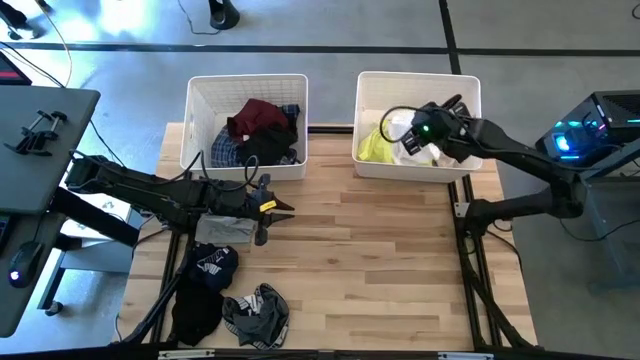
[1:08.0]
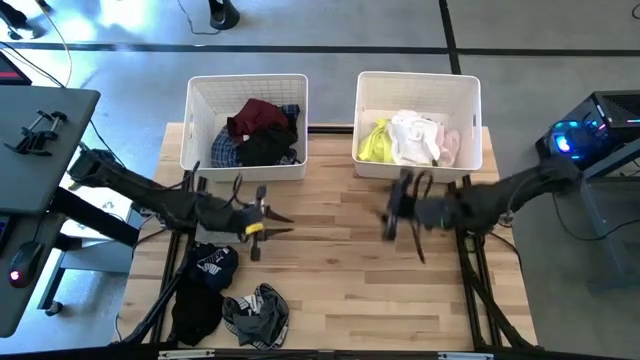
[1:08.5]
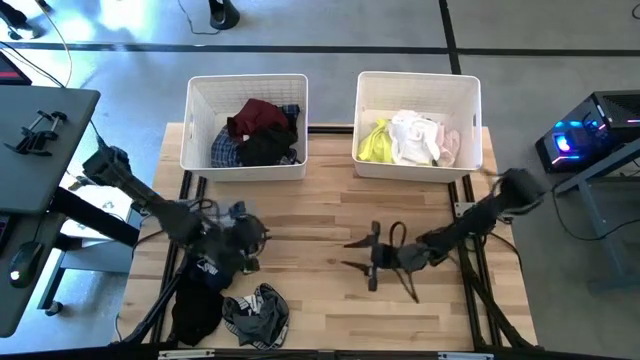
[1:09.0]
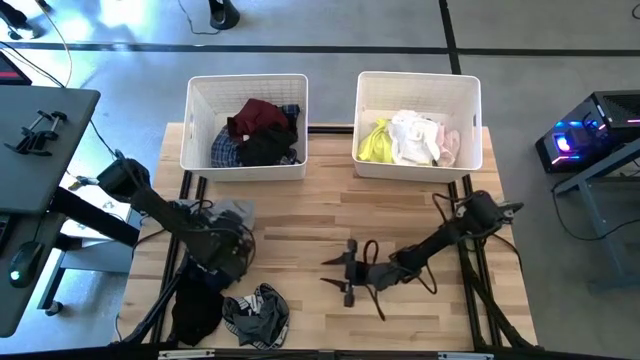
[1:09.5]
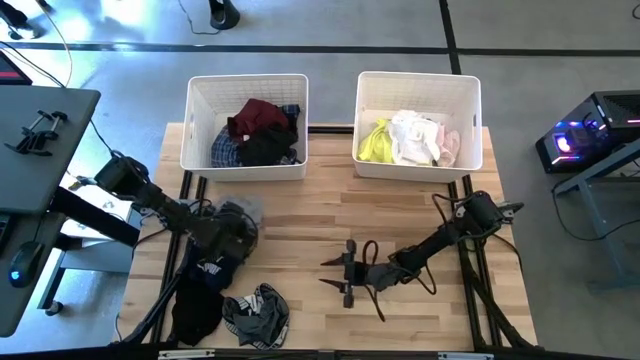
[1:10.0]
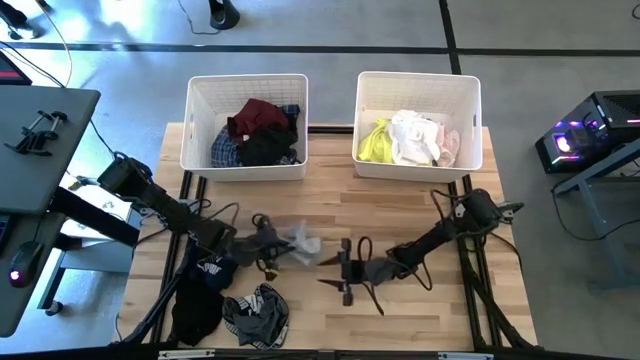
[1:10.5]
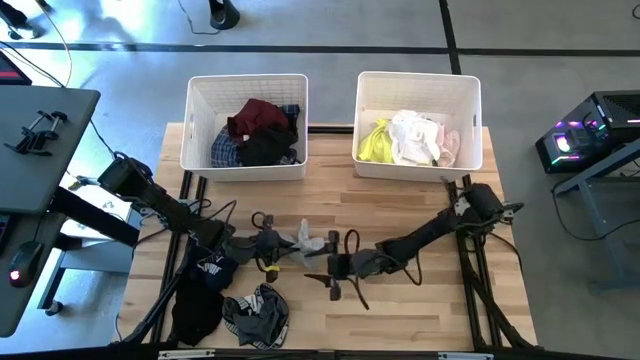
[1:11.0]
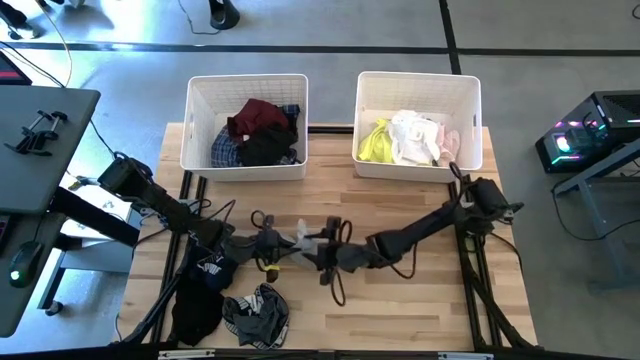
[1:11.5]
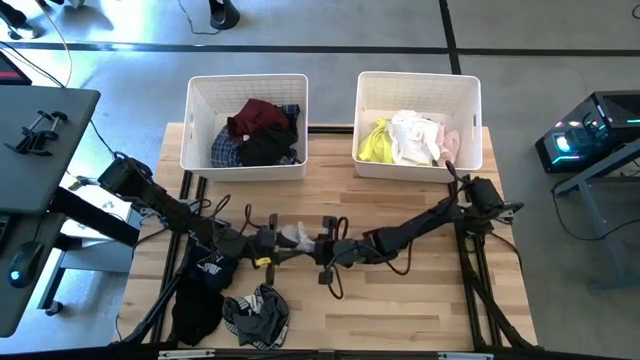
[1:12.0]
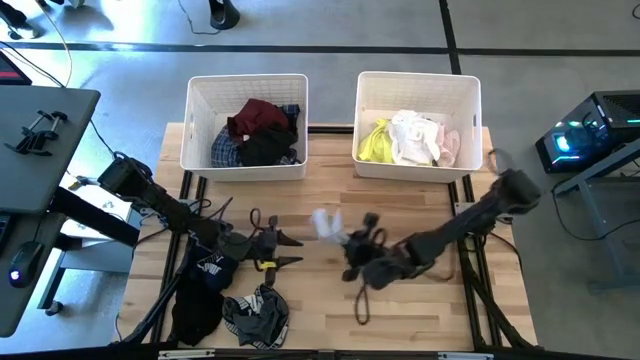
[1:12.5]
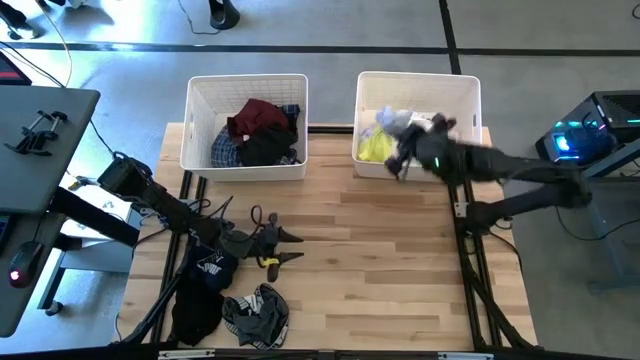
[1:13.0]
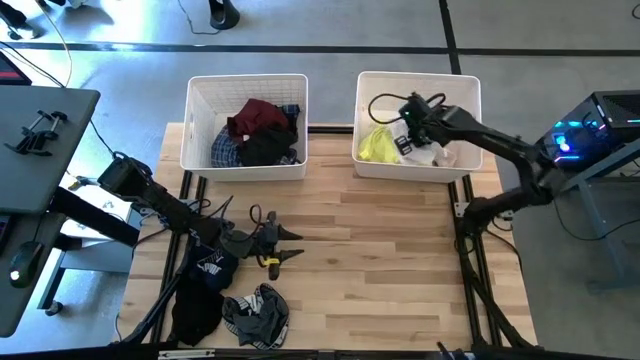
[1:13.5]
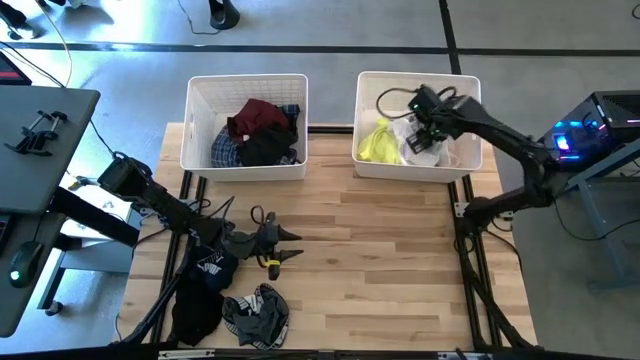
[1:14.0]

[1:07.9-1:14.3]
Task: Sort clothes
Put the gray underwear into the right white bin

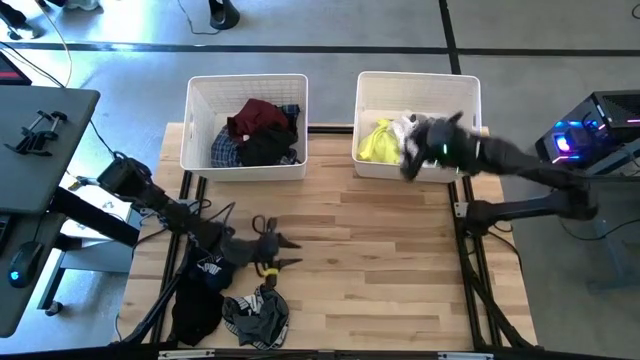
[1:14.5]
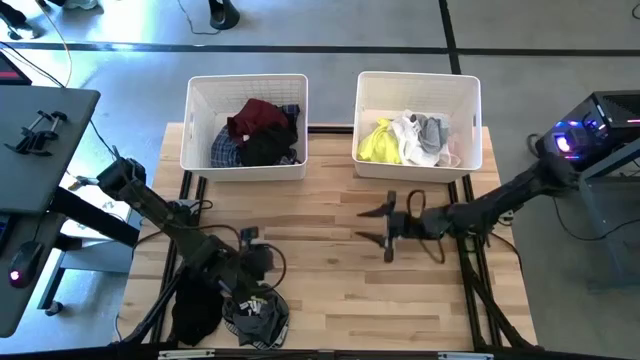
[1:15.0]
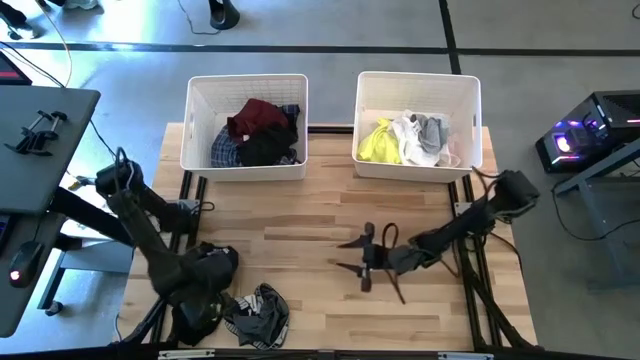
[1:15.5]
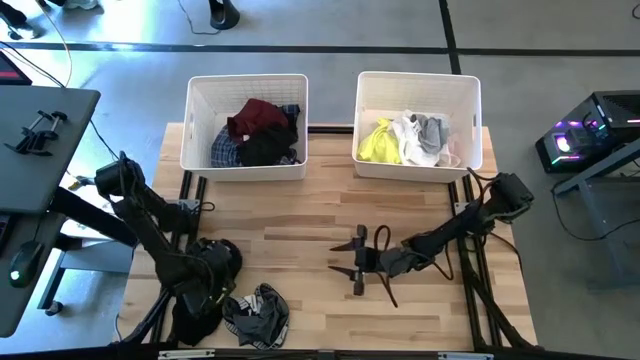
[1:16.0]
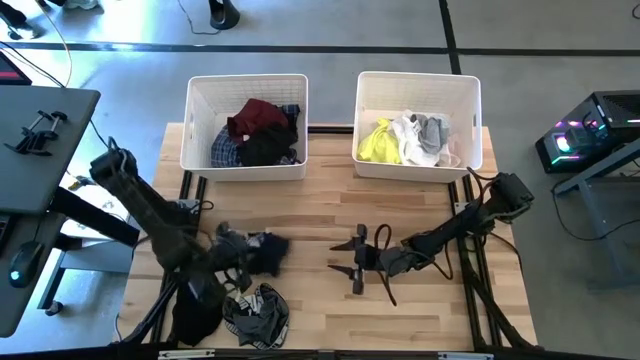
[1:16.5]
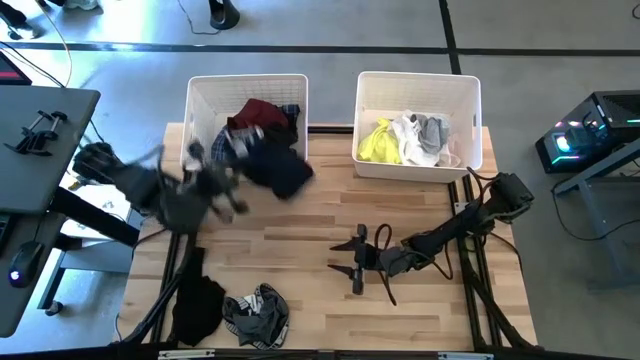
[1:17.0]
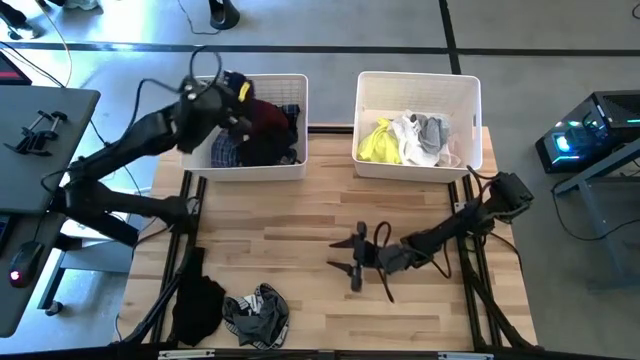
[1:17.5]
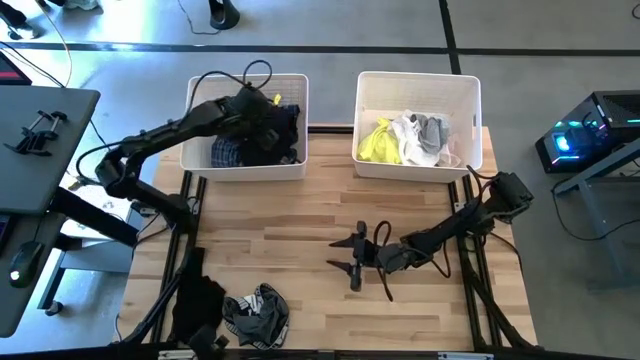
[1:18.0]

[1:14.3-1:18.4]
Put the dark blue boxer shorts into the left white bin

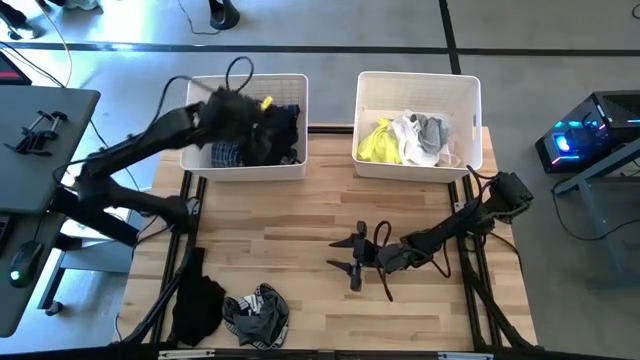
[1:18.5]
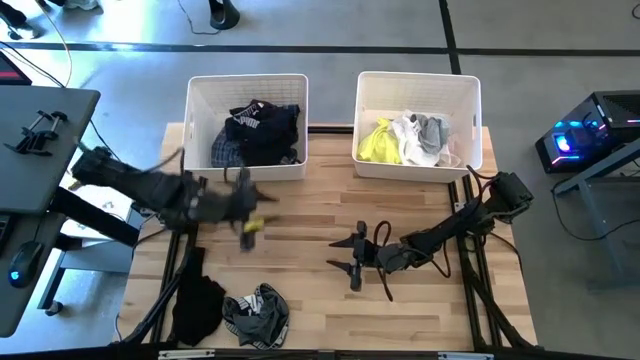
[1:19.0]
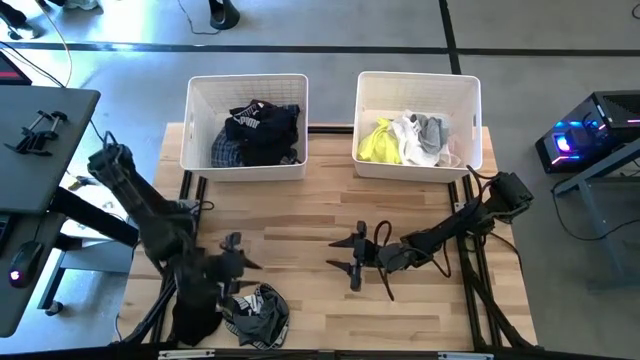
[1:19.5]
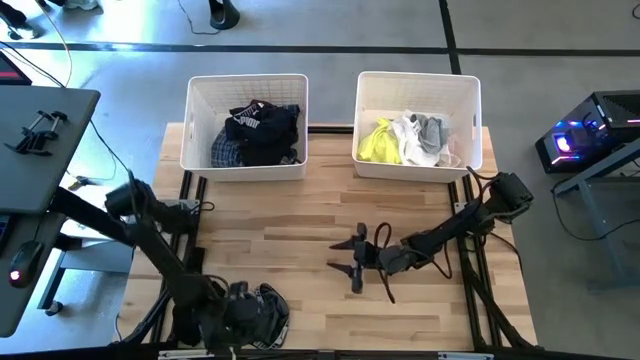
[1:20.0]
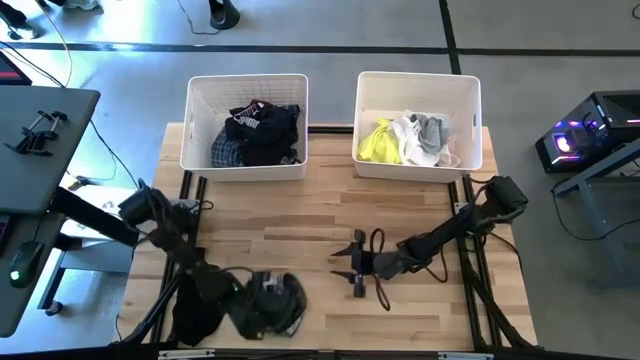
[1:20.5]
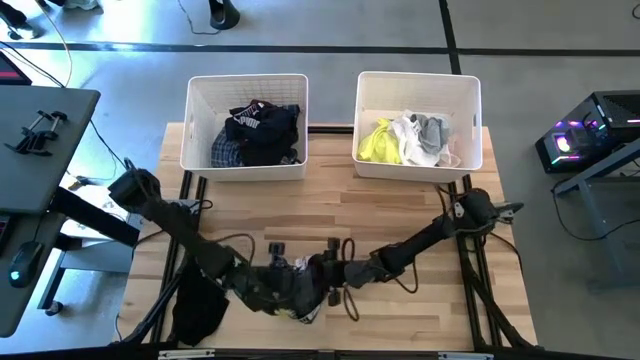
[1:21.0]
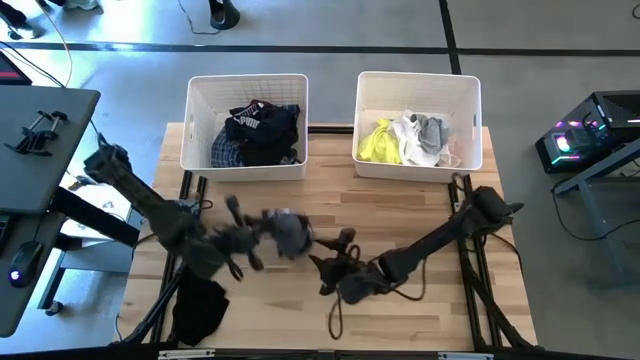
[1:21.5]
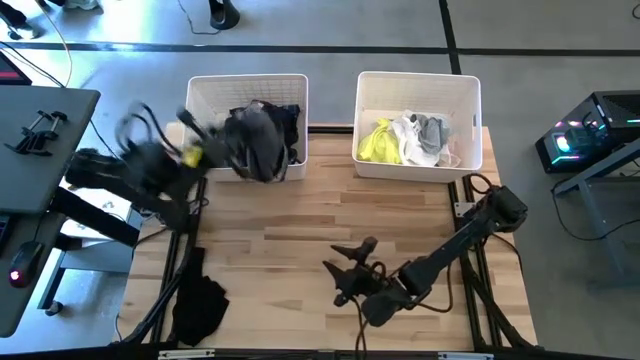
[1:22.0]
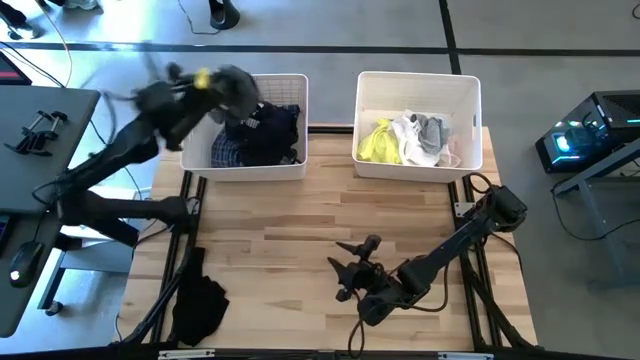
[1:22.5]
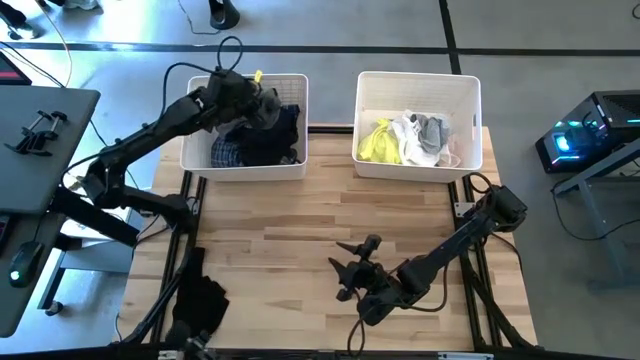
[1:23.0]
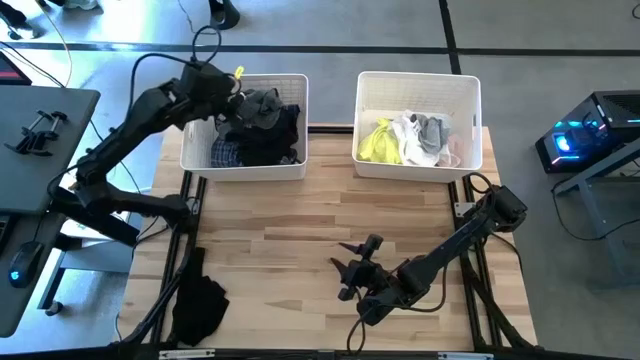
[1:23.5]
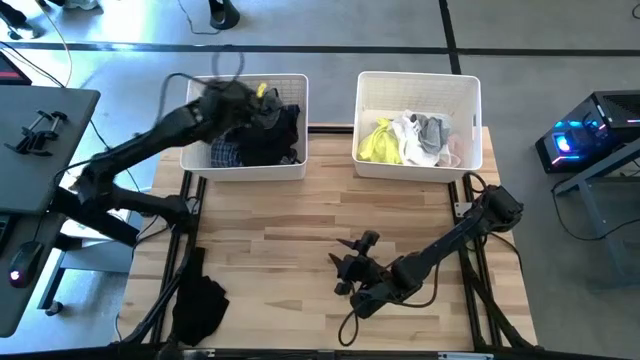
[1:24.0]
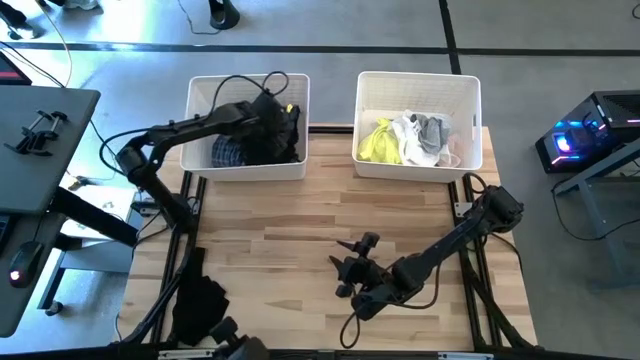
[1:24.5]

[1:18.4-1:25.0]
Put the gray boxer shorts into the left white bin

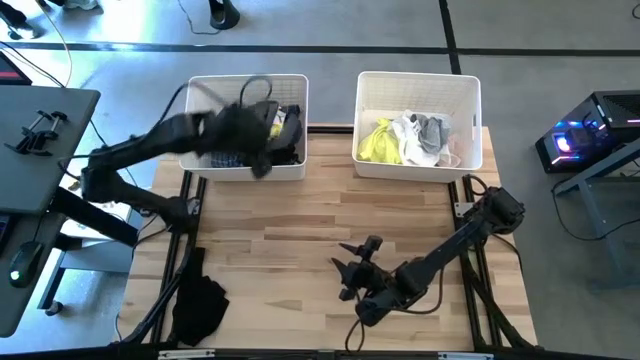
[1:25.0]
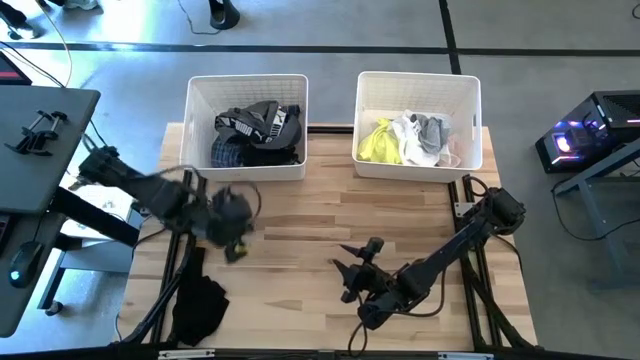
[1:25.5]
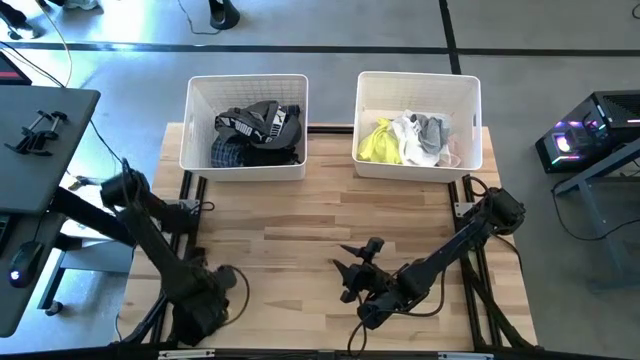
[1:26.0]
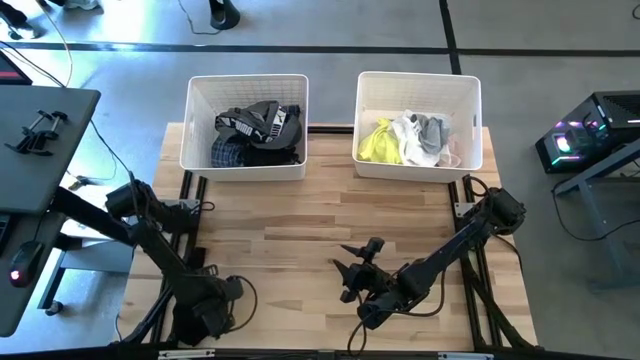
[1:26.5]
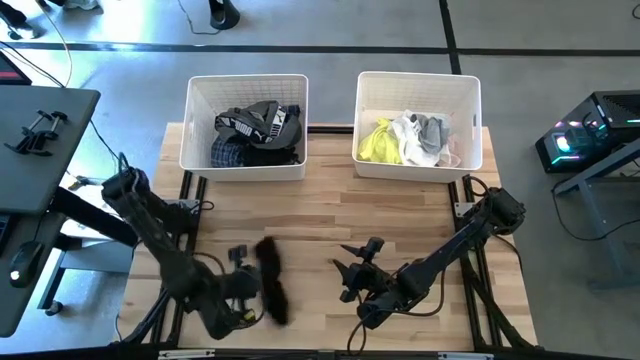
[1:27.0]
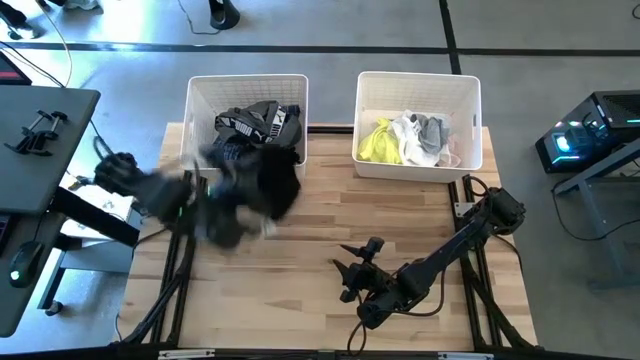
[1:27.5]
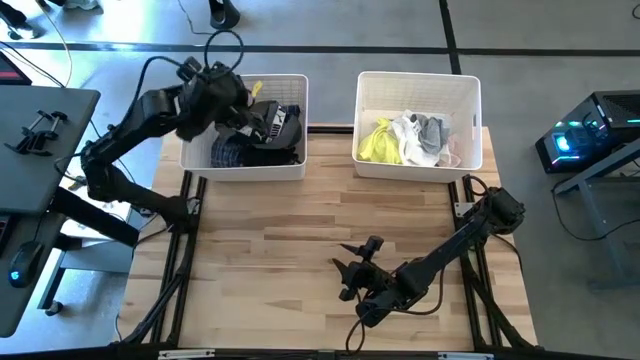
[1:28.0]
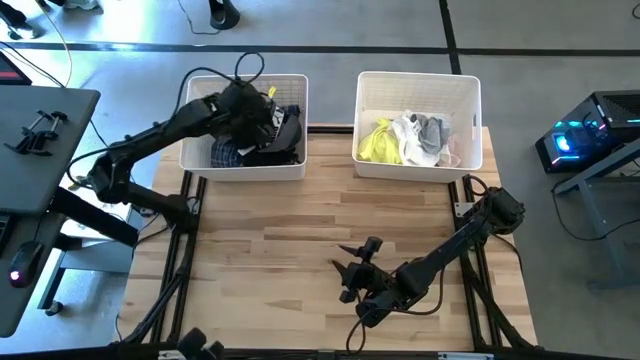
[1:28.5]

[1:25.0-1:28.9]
Put the black shorts into the left white bin
